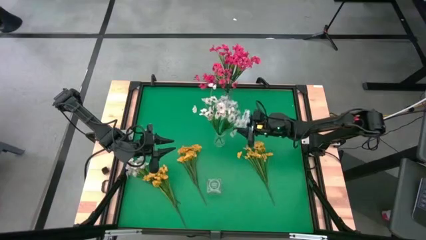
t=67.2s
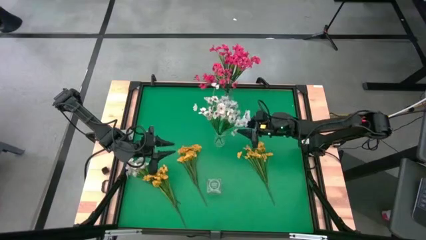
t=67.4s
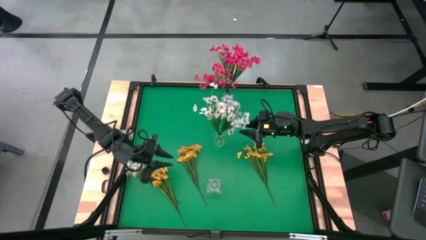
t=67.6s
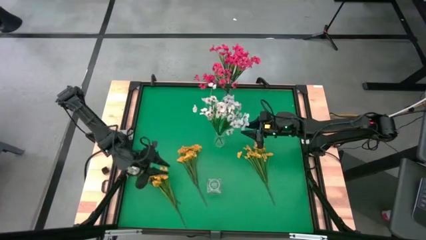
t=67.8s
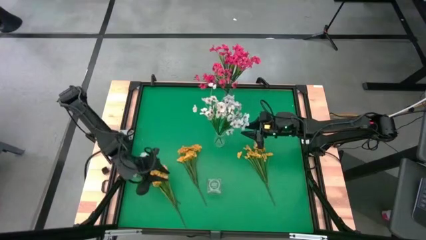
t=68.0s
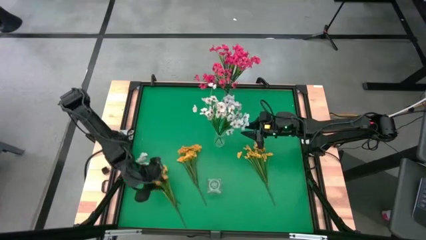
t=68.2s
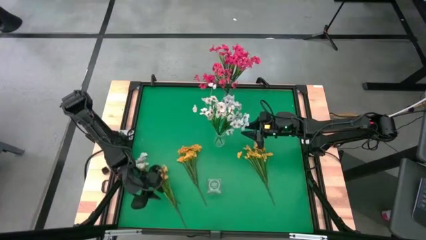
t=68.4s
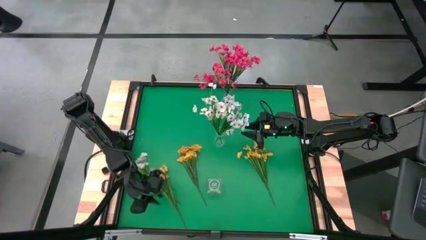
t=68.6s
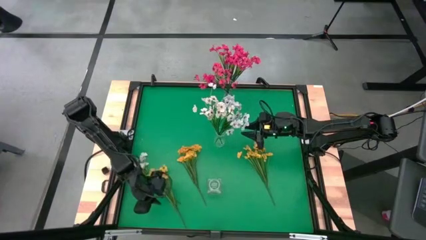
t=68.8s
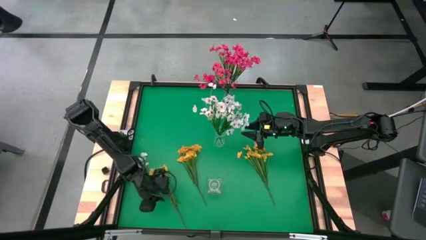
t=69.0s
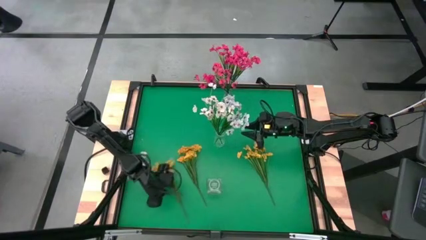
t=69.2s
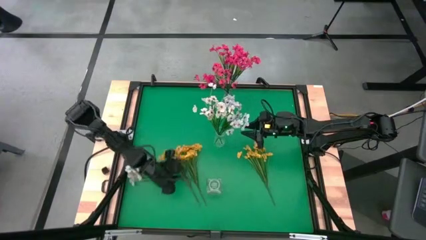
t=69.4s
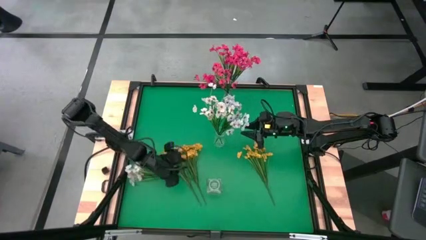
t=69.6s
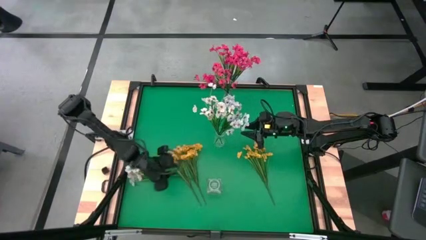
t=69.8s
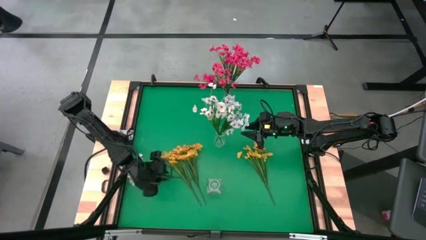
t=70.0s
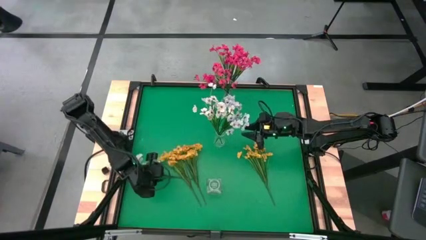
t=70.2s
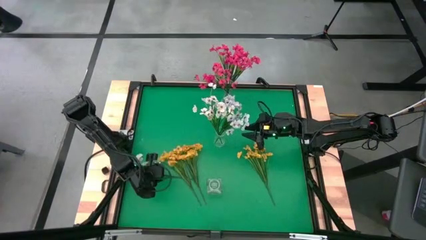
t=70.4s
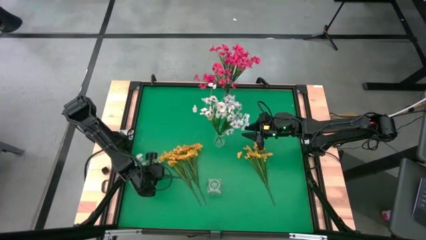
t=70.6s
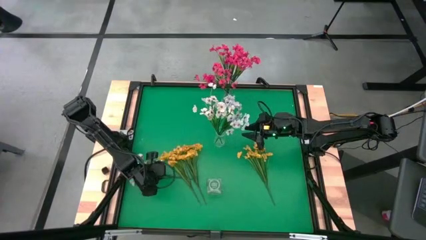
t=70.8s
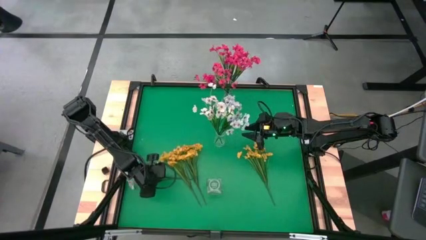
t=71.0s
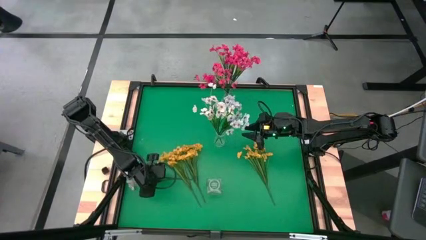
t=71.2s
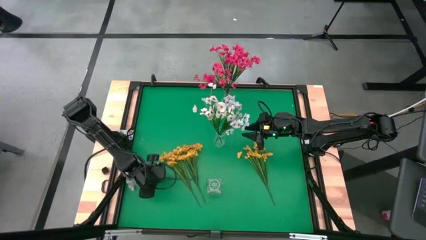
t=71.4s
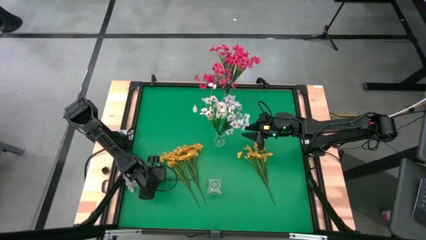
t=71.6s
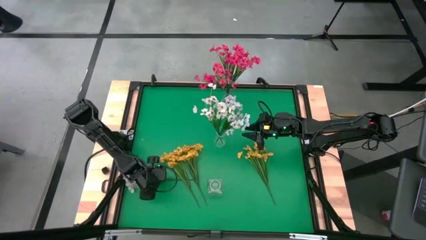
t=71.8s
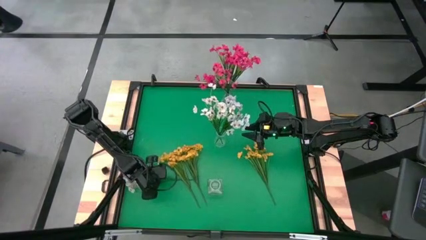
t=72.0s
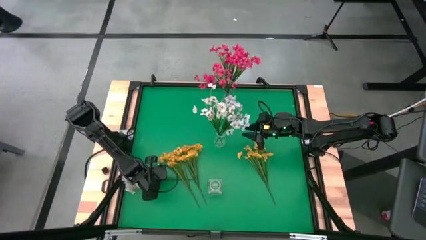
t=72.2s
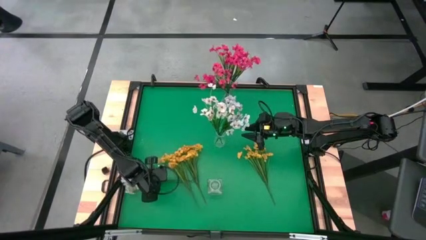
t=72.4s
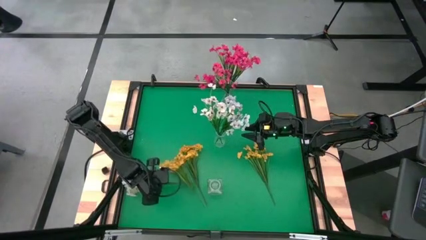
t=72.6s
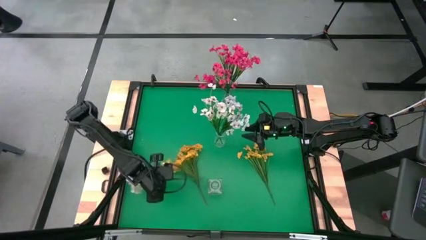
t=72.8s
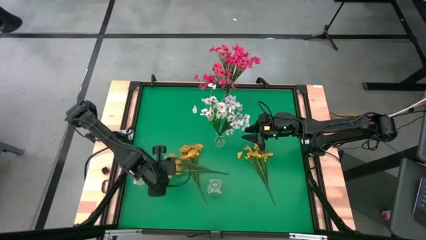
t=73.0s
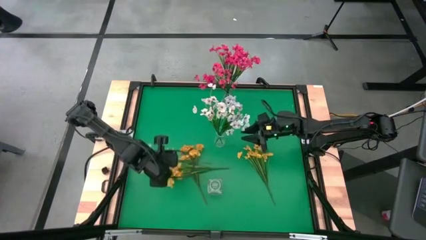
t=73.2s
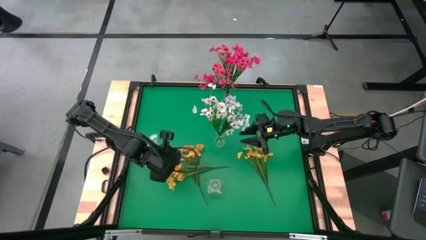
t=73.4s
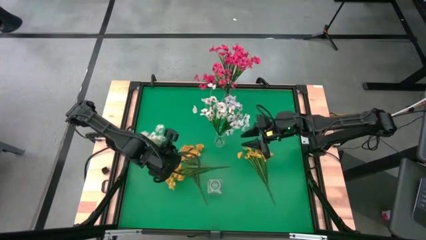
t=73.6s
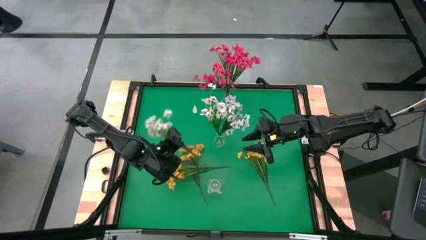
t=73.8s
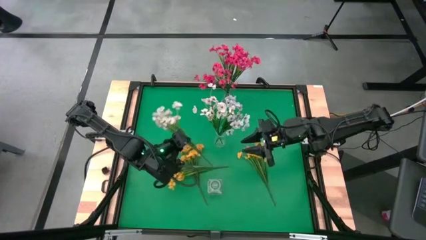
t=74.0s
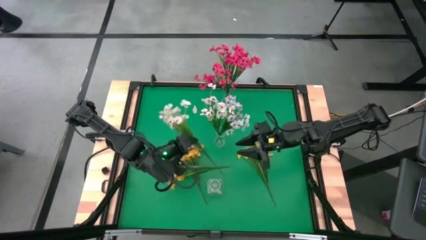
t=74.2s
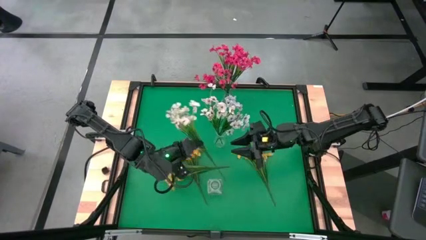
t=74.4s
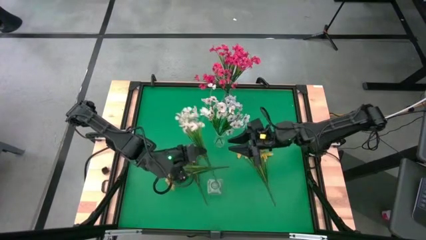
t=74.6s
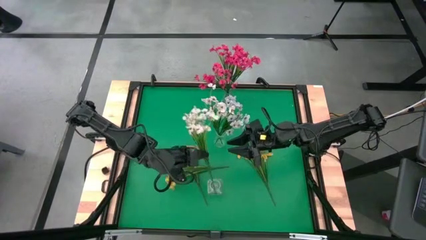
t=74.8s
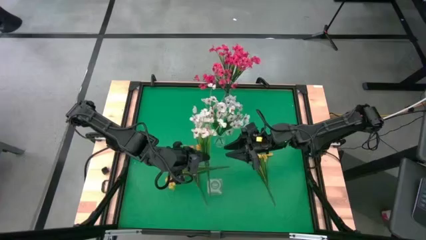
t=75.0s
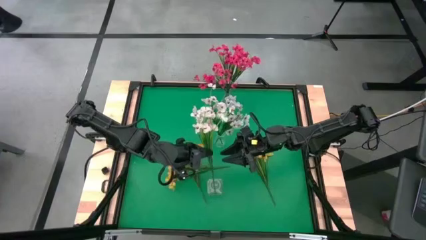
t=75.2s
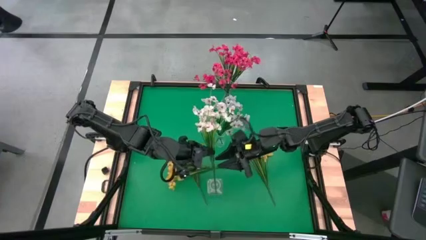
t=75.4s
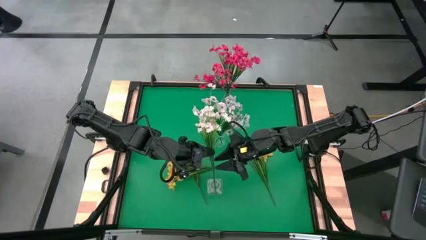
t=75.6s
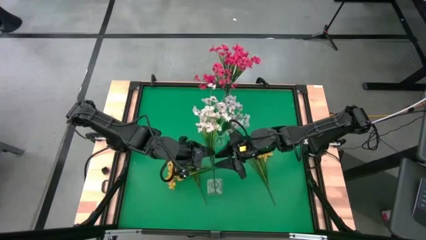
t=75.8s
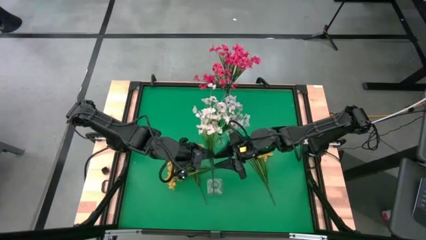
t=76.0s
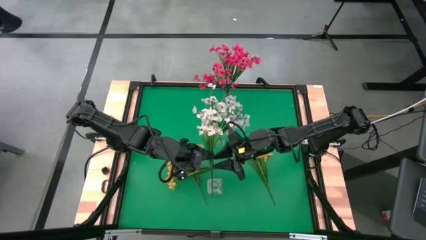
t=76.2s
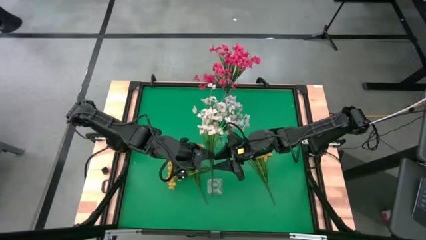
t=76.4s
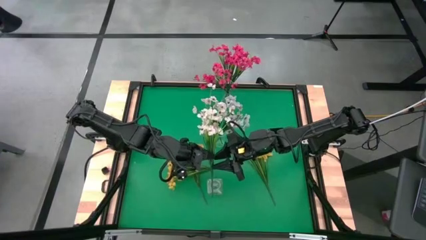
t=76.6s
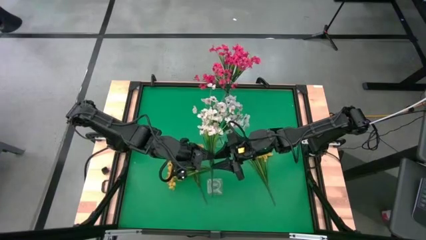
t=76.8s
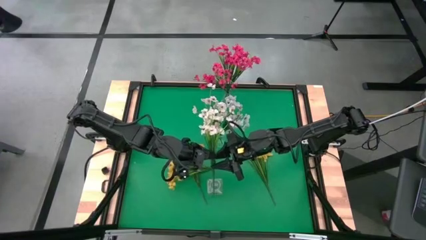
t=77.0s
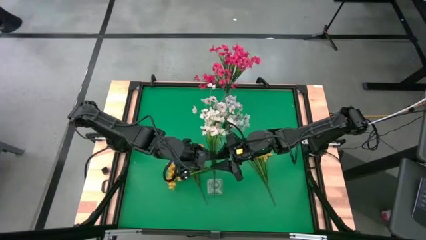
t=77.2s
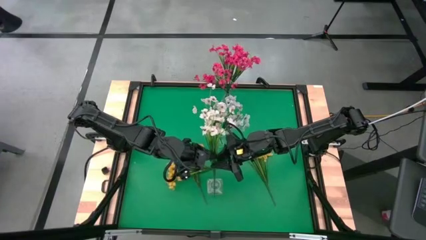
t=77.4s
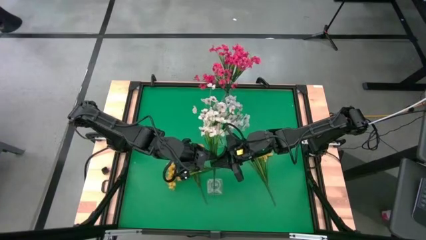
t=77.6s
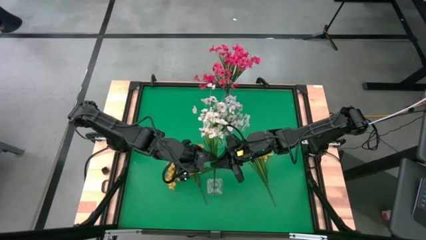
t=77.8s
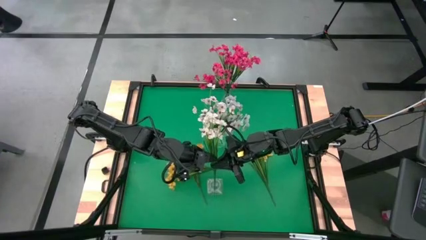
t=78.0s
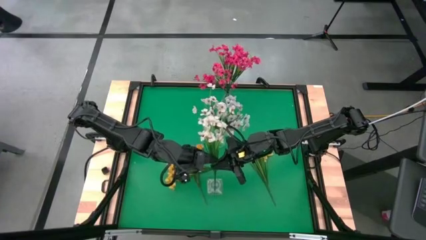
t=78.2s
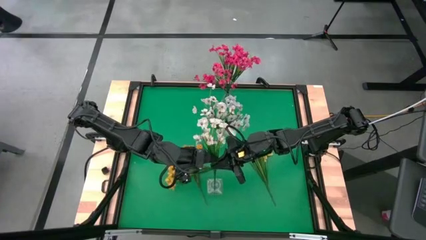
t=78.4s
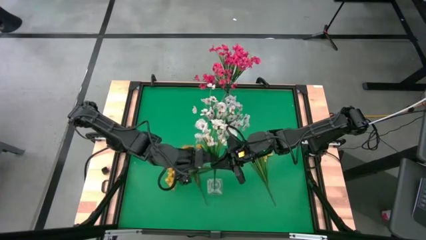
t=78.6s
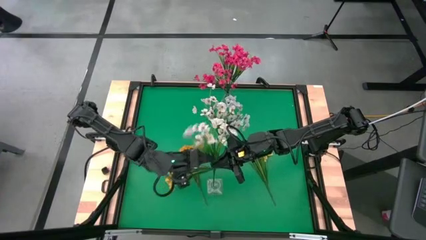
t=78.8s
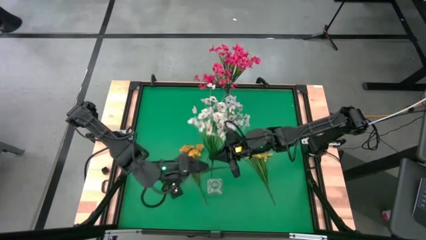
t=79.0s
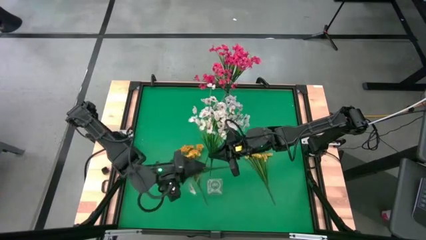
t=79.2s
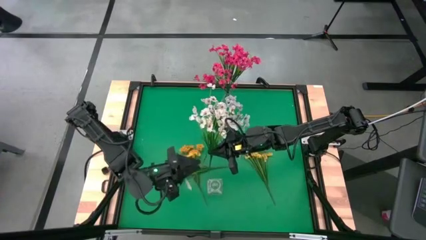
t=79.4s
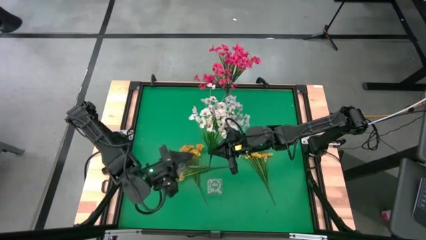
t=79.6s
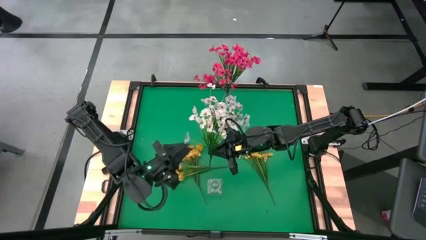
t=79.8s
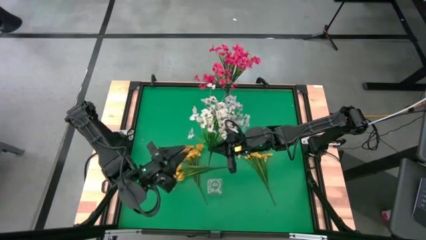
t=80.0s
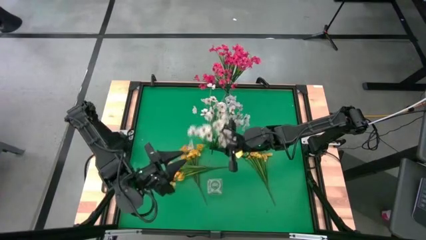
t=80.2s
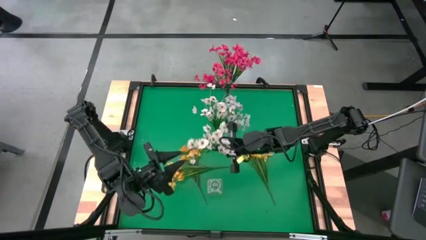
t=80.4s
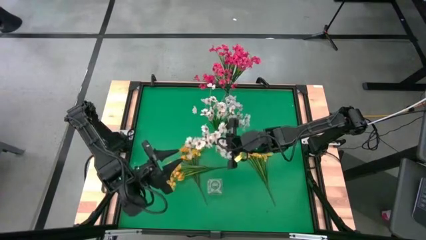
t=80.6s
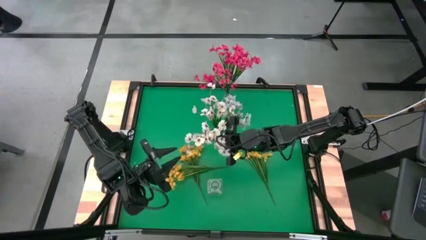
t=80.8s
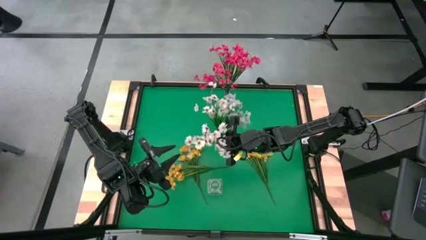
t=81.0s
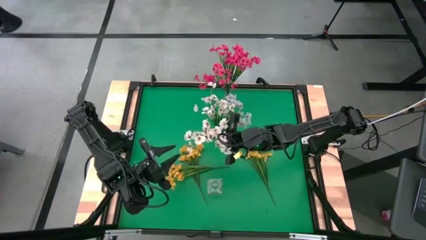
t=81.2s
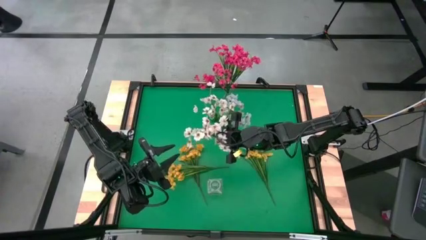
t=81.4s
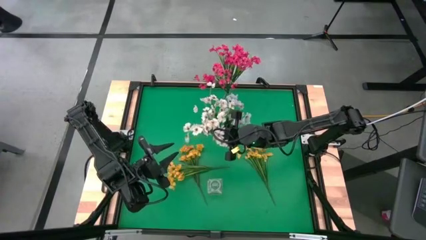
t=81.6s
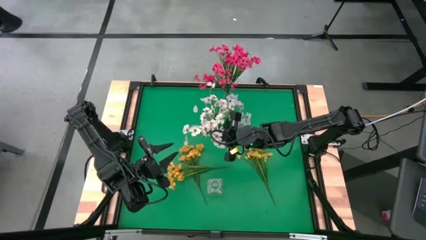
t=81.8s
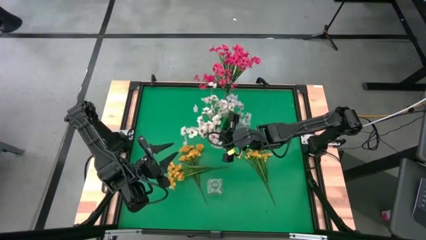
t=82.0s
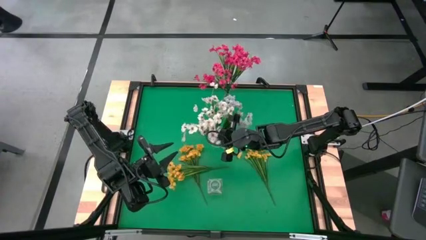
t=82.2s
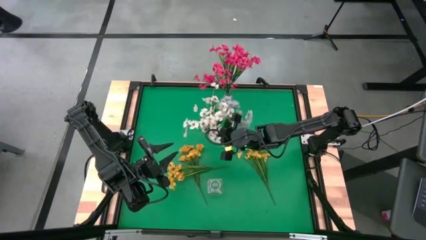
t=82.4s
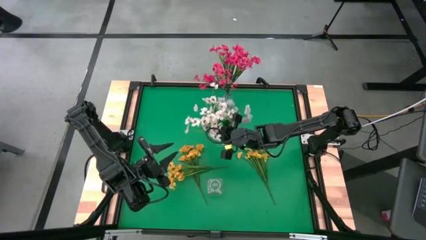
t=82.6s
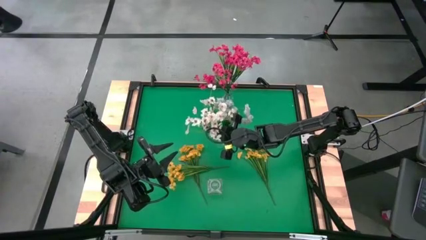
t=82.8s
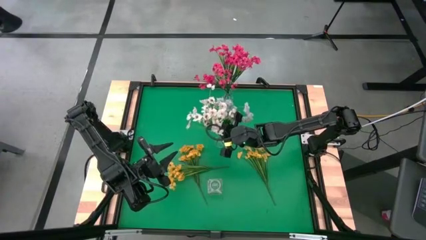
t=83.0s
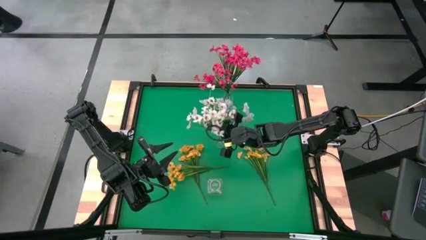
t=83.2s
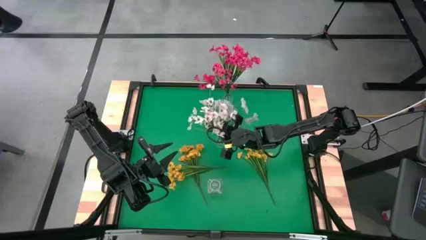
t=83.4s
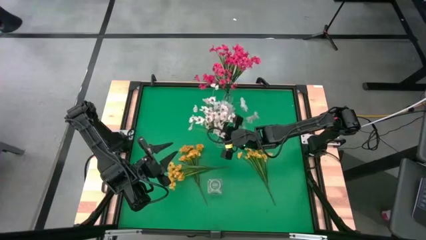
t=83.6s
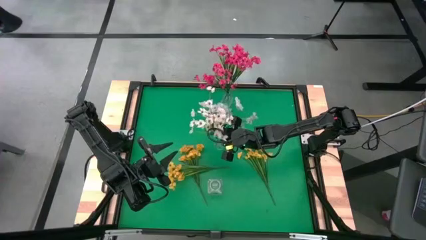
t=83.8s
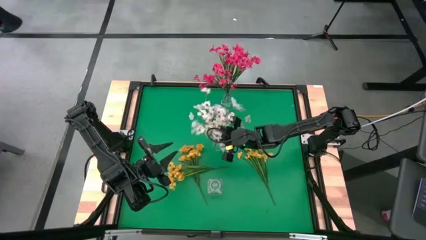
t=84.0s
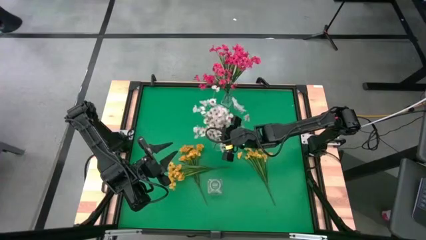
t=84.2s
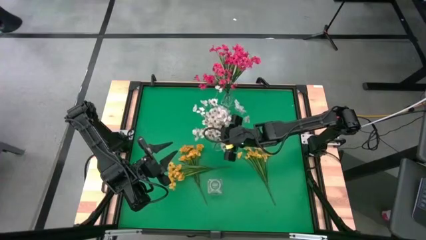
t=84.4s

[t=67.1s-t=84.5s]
Task: Sort flowers into vase by color
Put the white flowers into the middle transparent vase

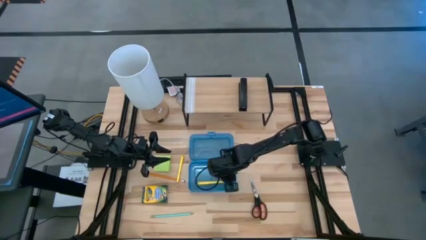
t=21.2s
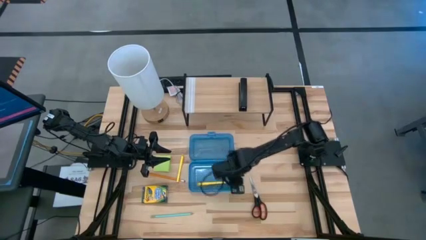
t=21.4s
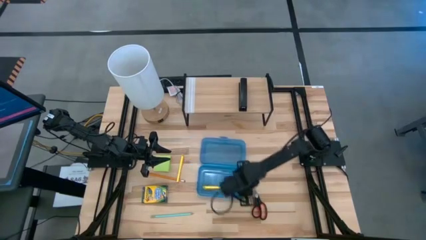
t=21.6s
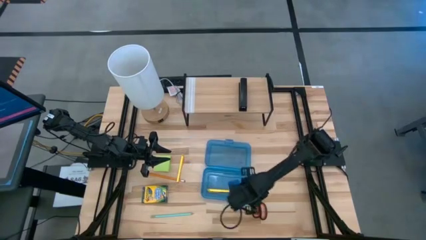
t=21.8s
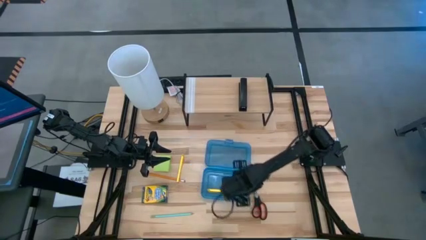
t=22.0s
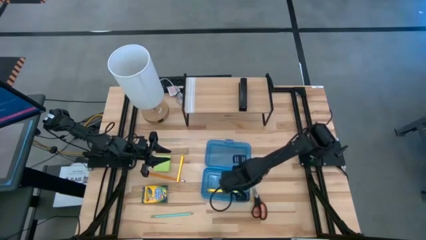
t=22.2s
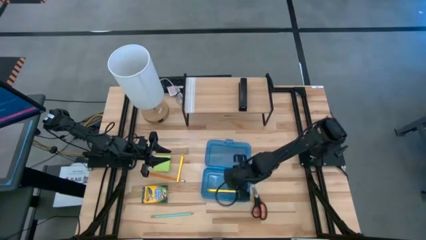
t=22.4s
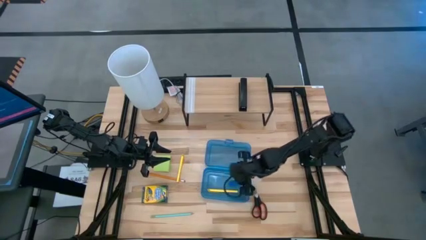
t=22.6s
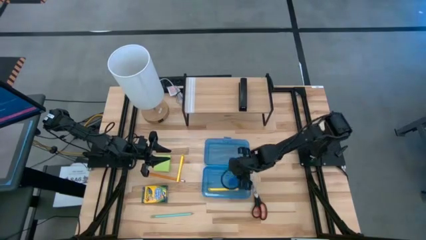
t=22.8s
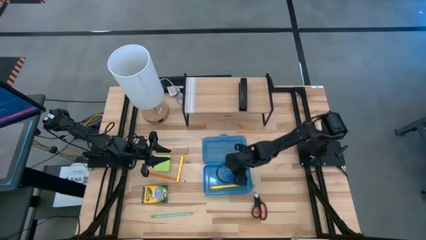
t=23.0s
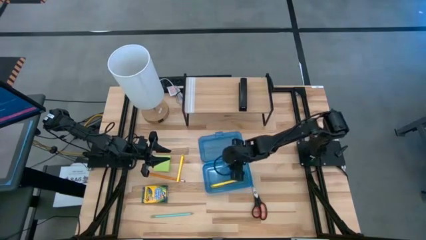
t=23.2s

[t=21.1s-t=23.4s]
Task: Pack school essentials
Adjust the blue supply box
